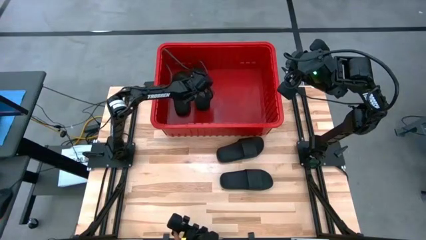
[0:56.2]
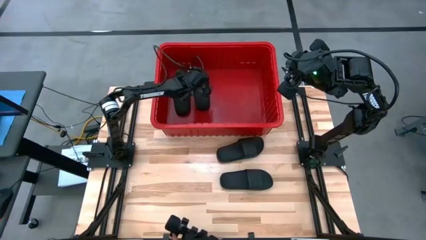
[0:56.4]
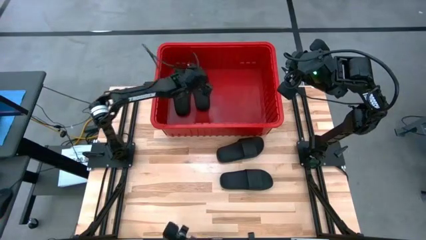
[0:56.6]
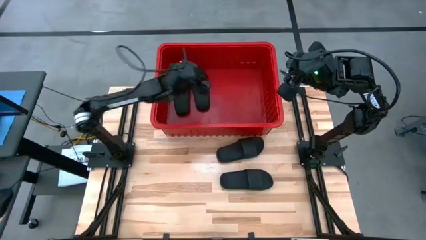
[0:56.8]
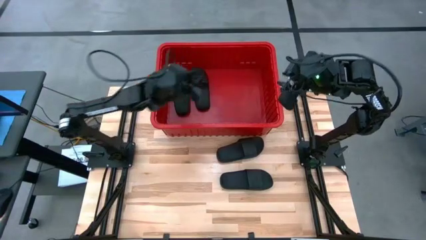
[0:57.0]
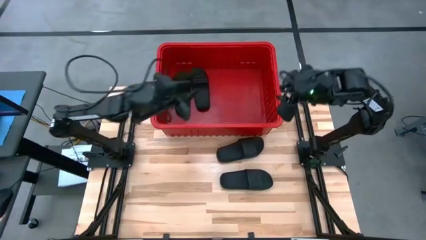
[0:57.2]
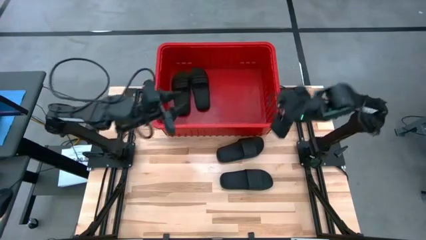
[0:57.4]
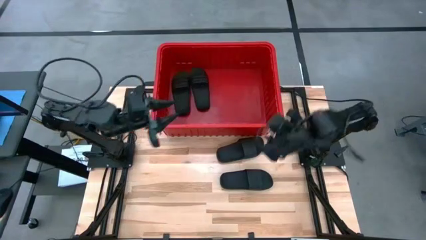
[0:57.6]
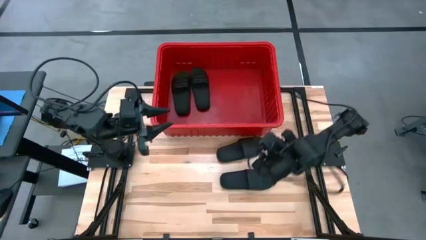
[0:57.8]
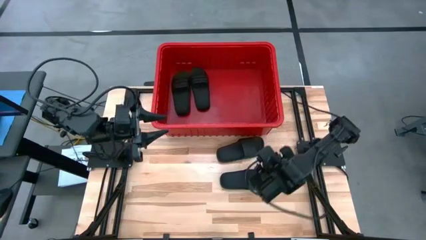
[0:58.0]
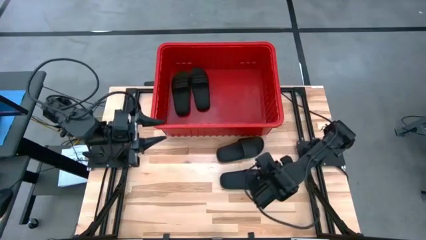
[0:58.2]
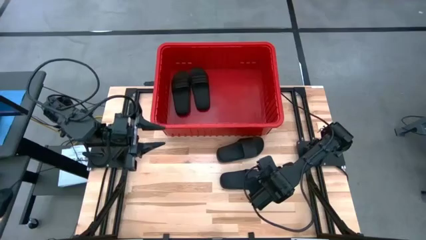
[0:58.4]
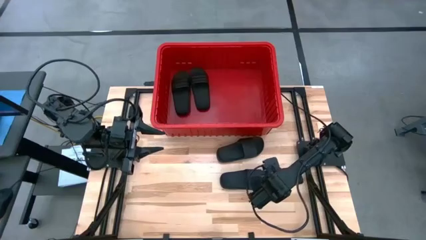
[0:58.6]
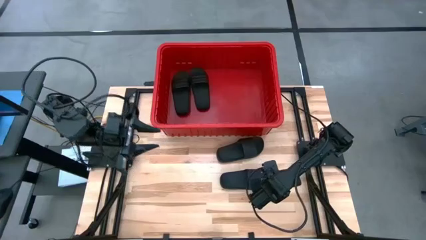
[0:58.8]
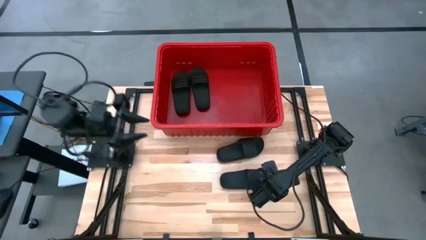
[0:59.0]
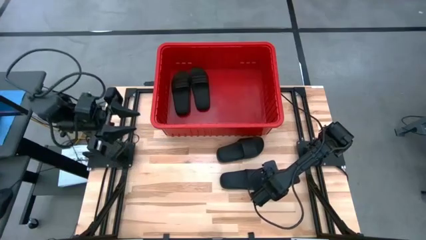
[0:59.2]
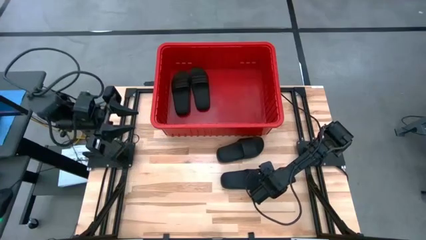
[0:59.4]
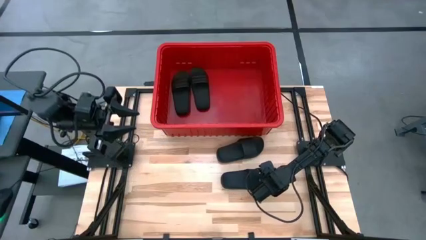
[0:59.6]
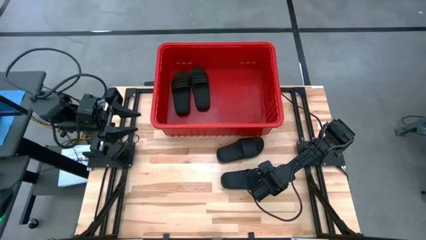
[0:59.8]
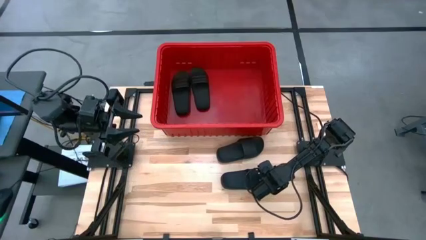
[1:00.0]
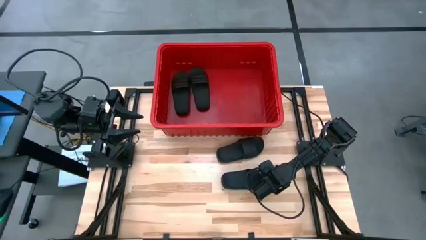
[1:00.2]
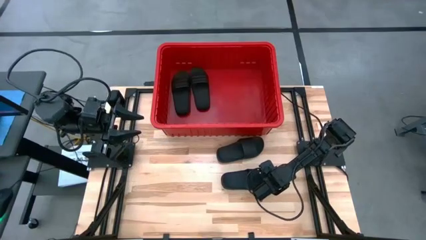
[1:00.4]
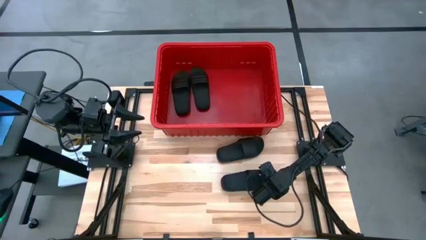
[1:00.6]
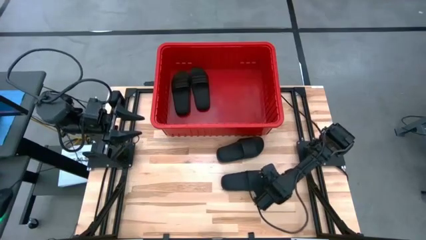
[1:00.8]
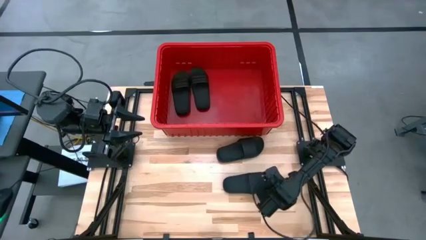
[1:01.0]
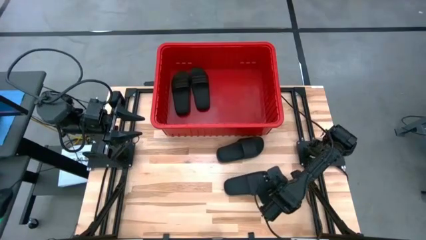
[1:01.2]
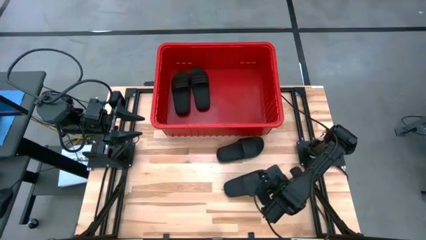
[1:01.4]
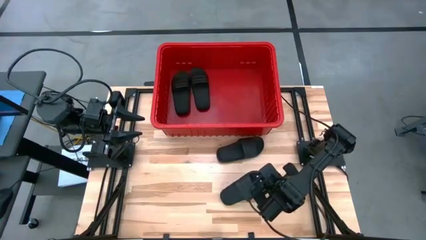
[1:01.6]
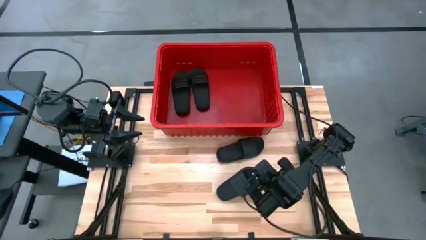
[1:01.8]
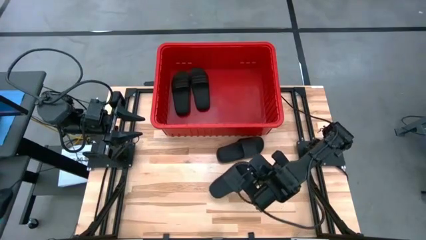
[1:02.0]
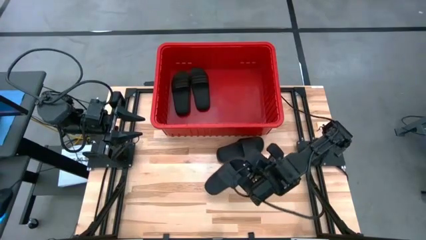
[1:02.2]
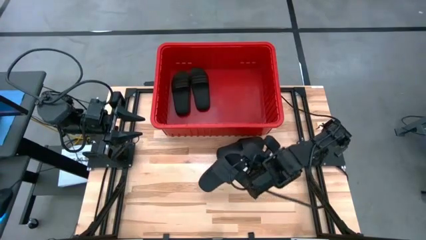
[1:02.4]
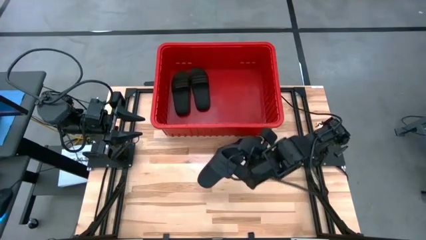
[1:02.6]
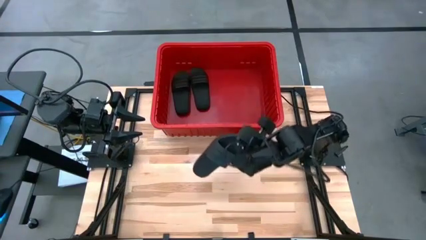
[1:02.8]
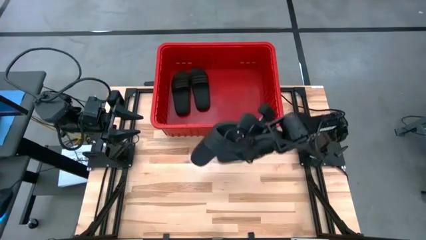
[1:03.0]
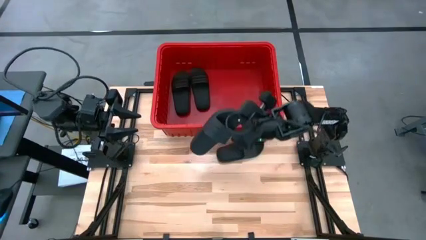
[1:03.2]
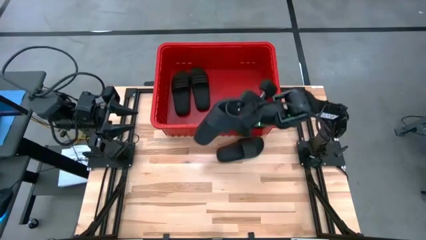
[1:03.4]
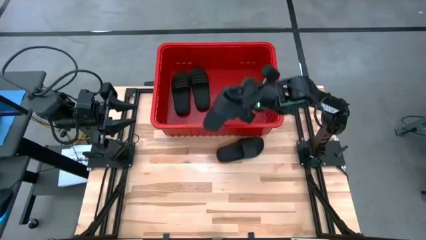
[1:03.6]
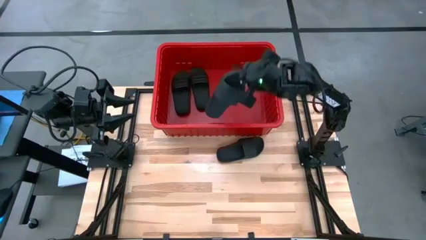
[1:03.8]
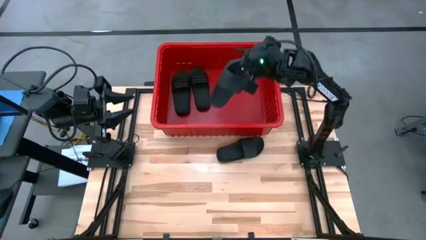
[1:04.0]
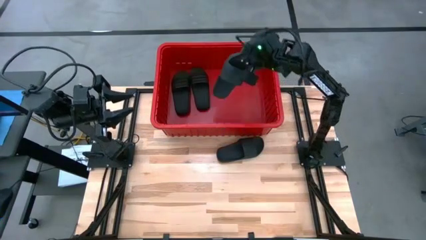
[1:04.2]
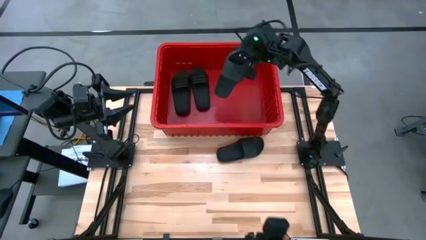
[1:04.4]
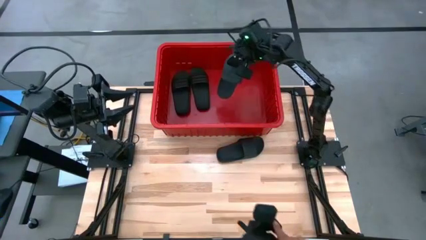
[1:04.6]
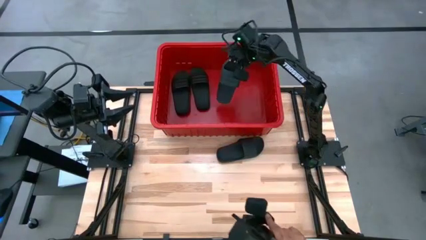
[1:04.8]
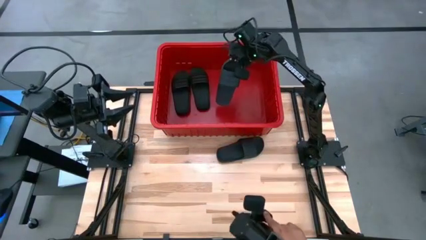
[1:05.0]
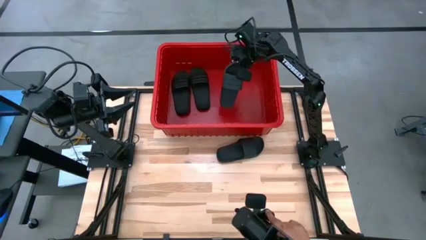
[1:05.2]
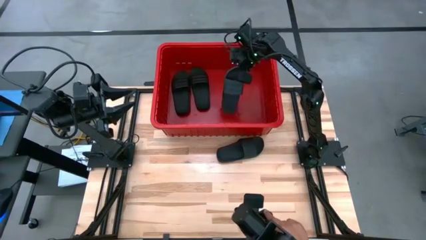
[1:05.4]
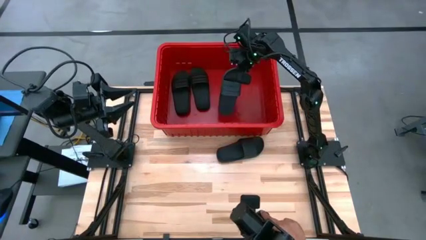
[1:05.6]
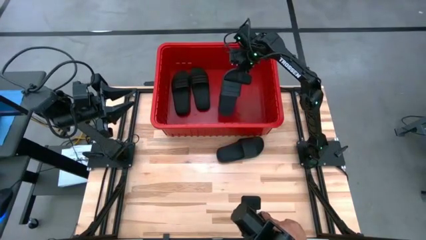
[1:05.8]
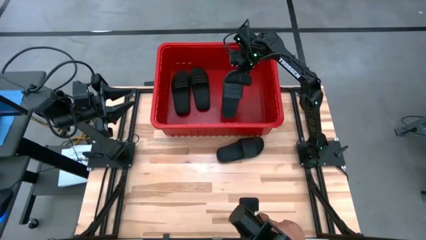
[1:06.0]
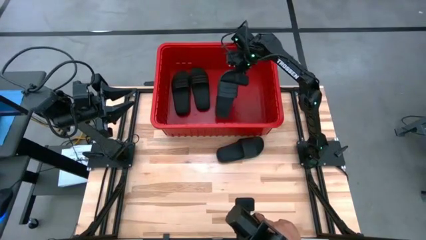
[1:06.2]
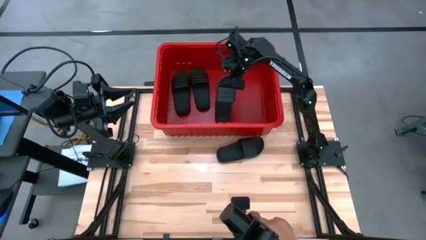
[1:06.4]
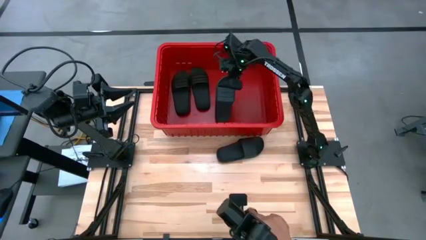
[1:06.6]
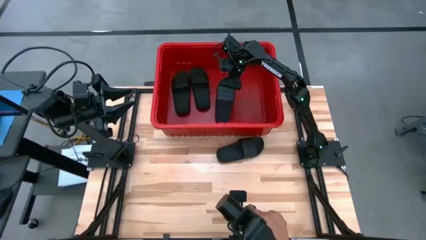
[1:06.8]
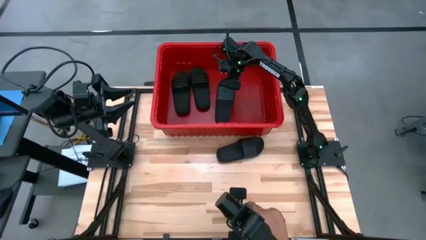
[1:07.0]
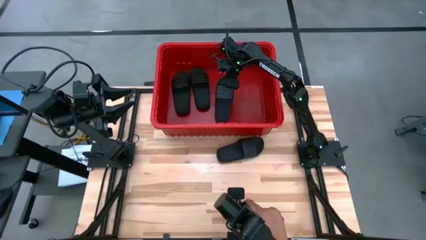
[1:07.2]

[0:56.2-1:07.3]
Task: Pick and place slides into bin
Put the black slide into the red bin
